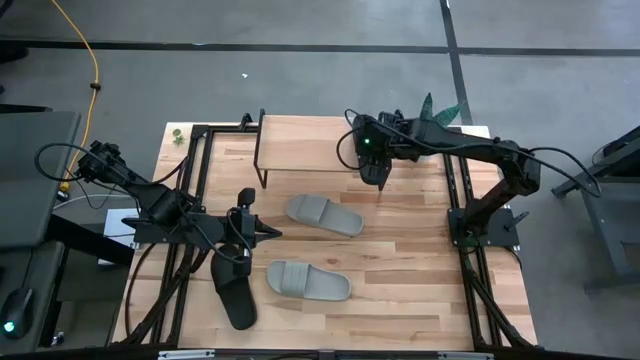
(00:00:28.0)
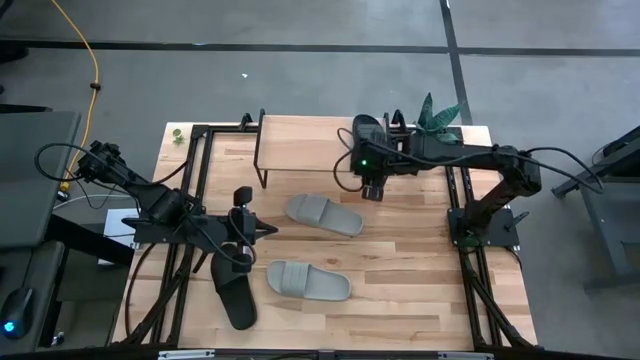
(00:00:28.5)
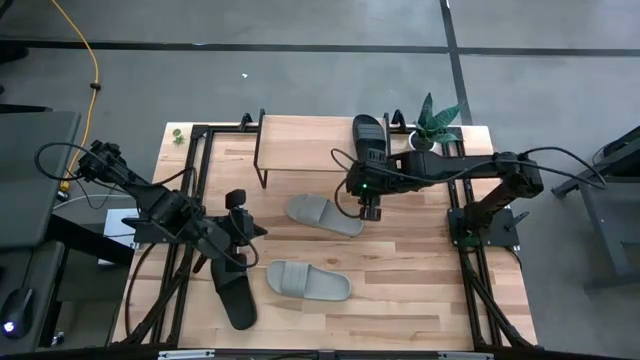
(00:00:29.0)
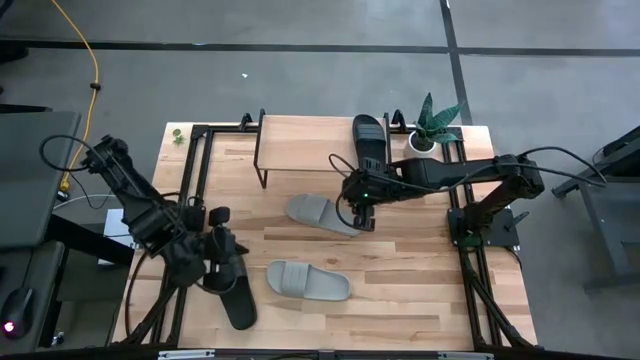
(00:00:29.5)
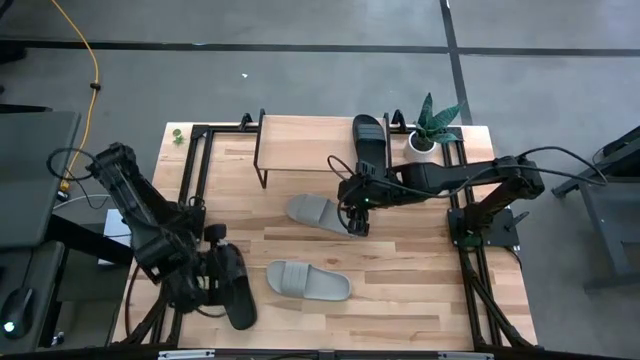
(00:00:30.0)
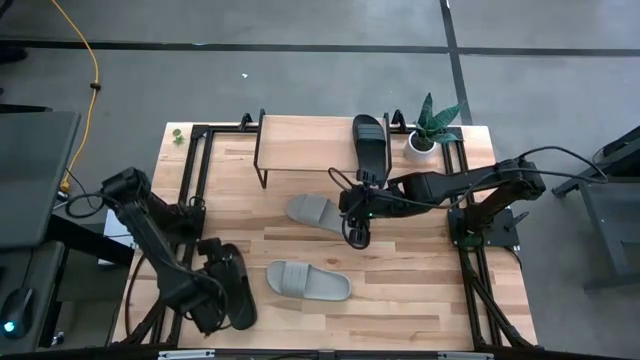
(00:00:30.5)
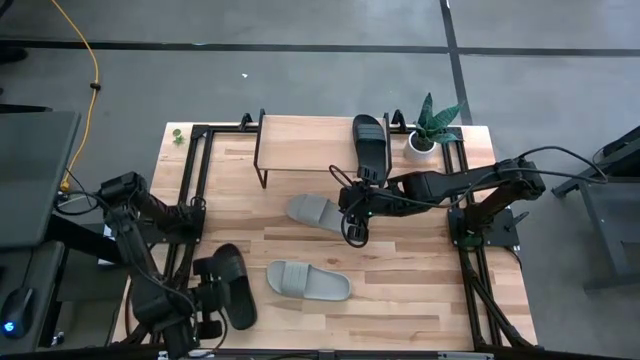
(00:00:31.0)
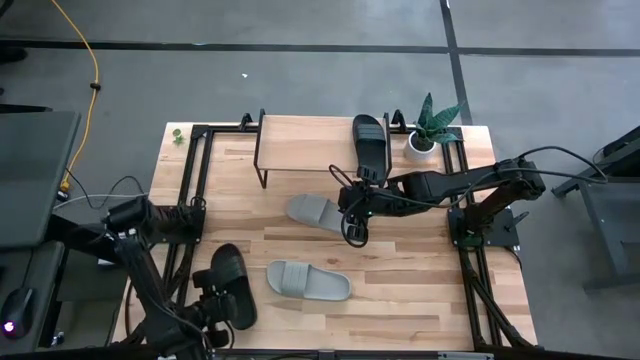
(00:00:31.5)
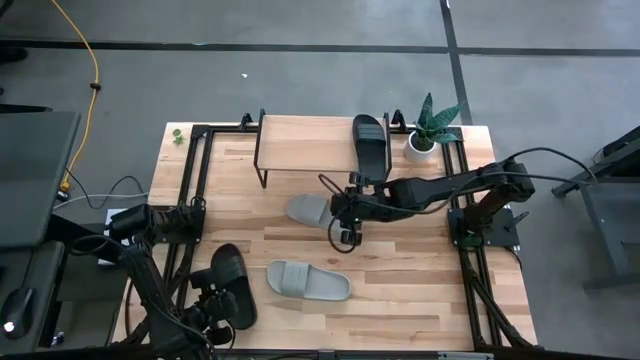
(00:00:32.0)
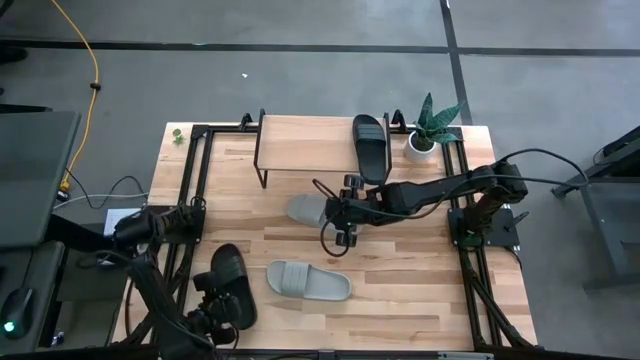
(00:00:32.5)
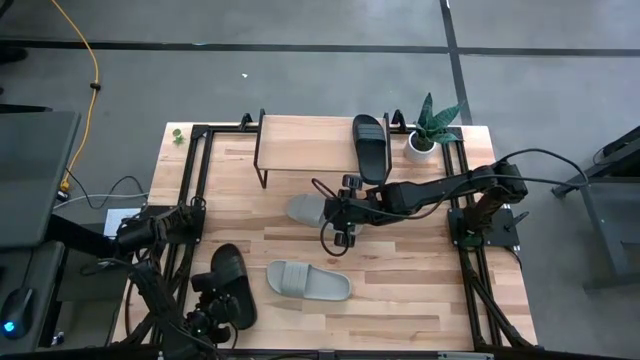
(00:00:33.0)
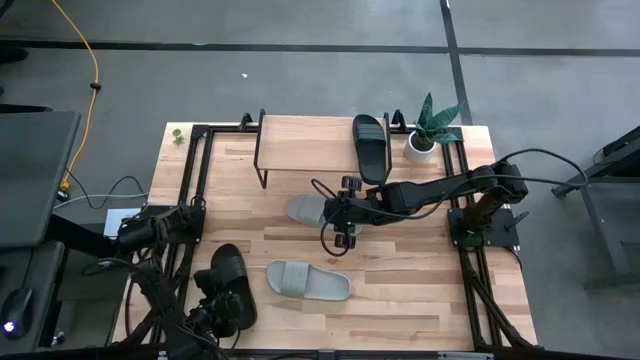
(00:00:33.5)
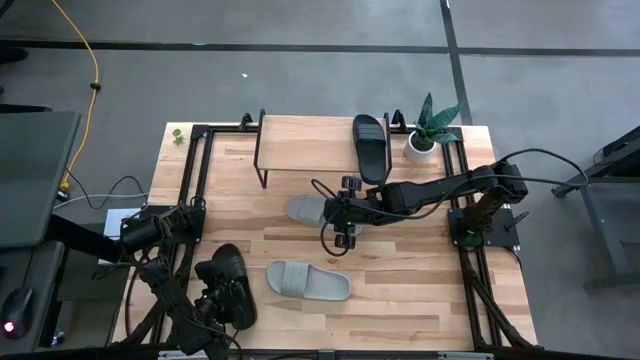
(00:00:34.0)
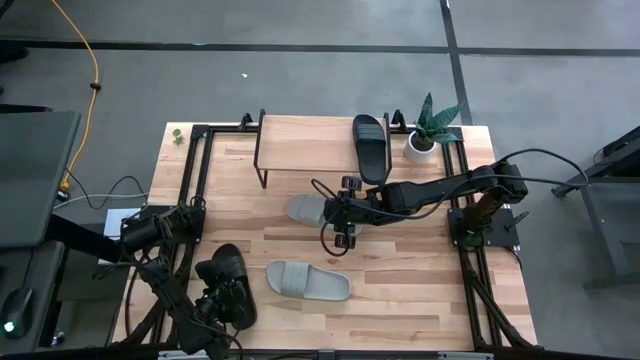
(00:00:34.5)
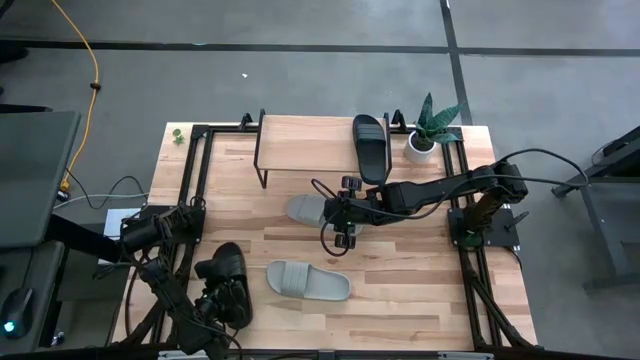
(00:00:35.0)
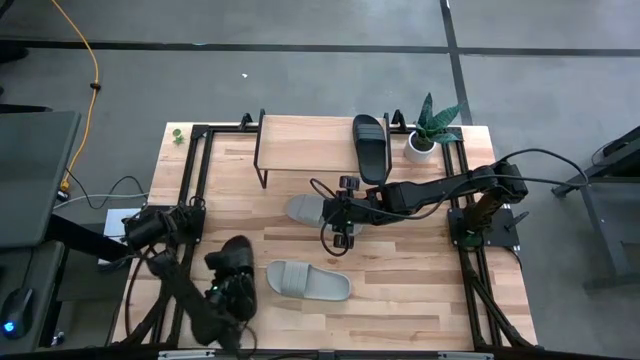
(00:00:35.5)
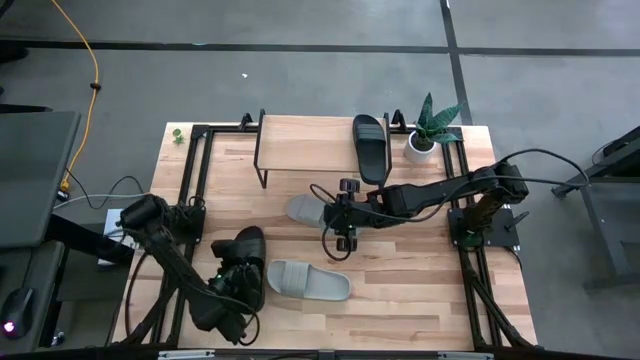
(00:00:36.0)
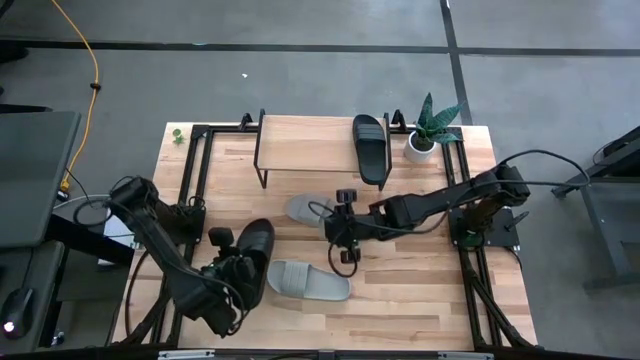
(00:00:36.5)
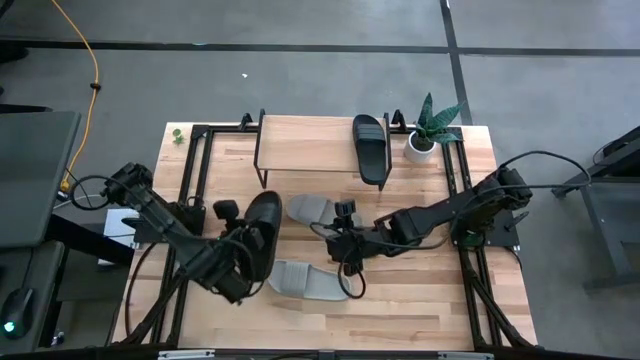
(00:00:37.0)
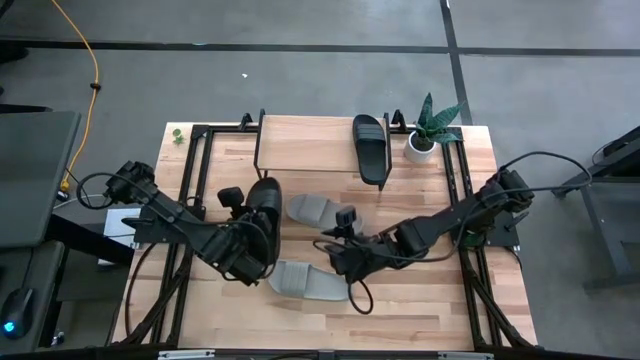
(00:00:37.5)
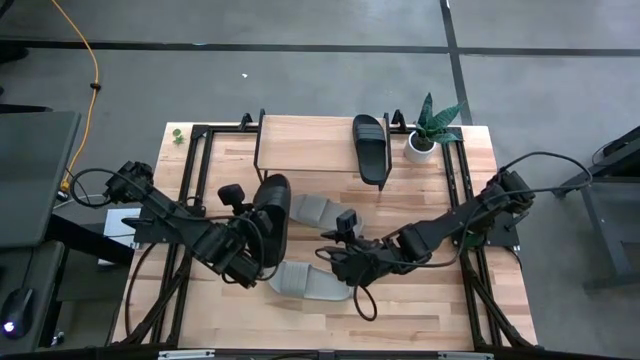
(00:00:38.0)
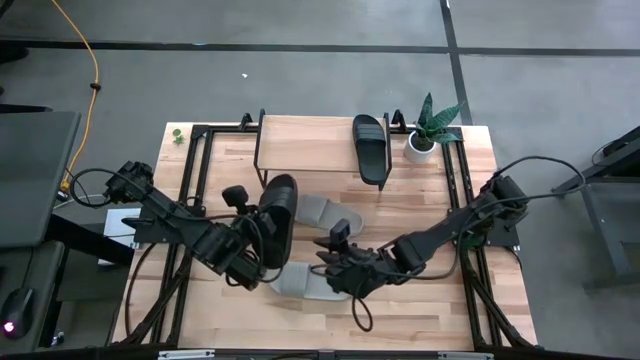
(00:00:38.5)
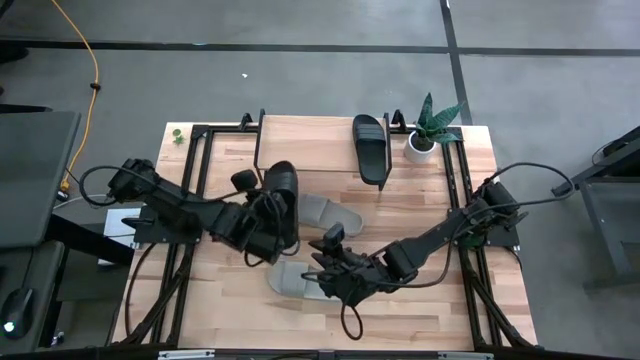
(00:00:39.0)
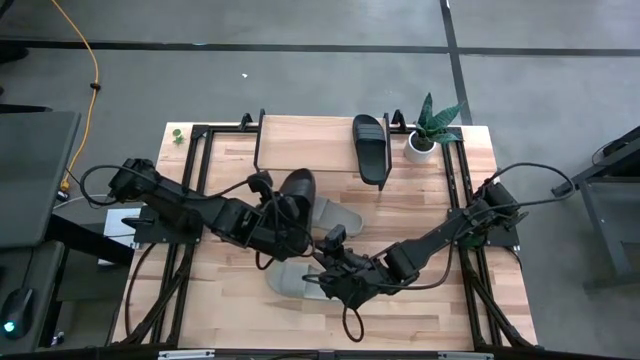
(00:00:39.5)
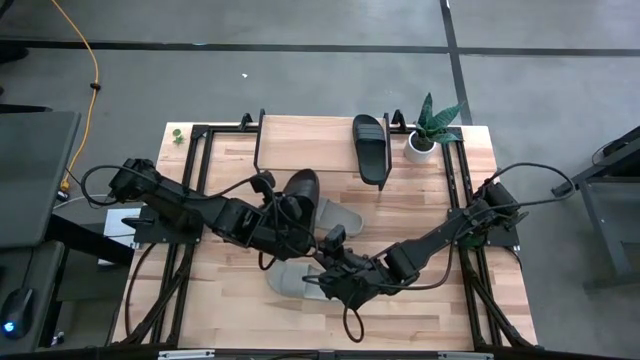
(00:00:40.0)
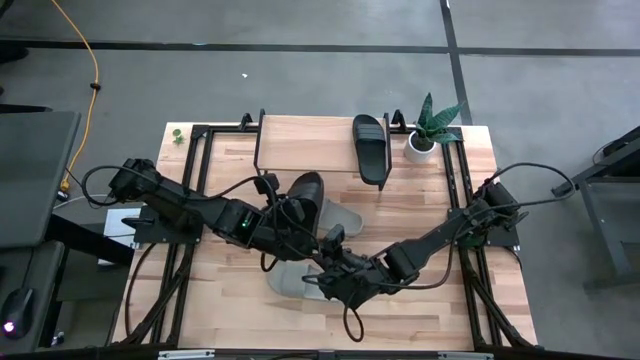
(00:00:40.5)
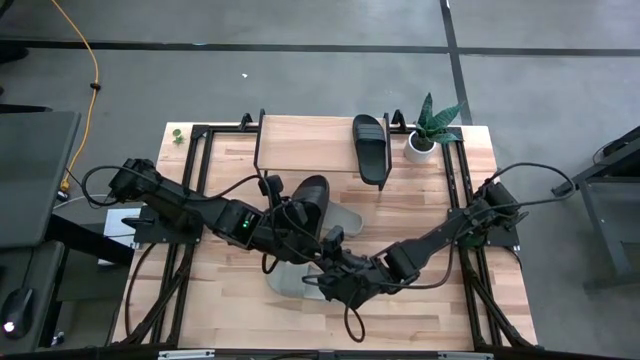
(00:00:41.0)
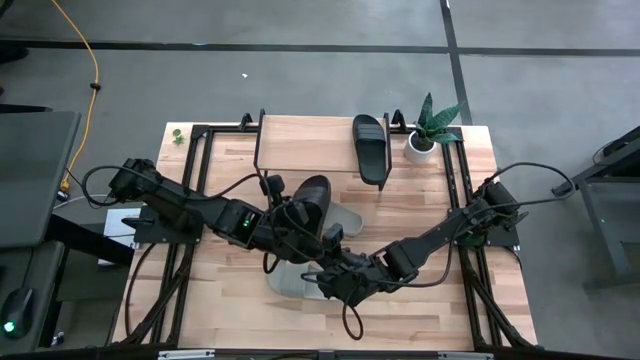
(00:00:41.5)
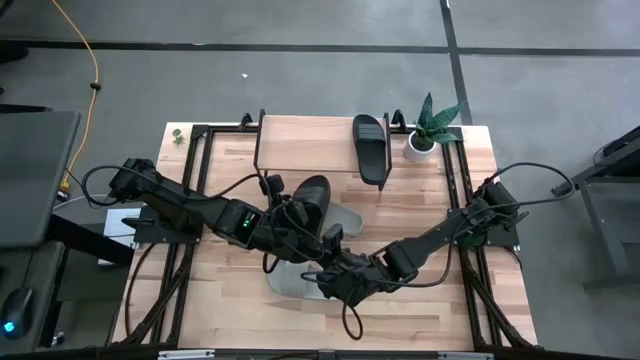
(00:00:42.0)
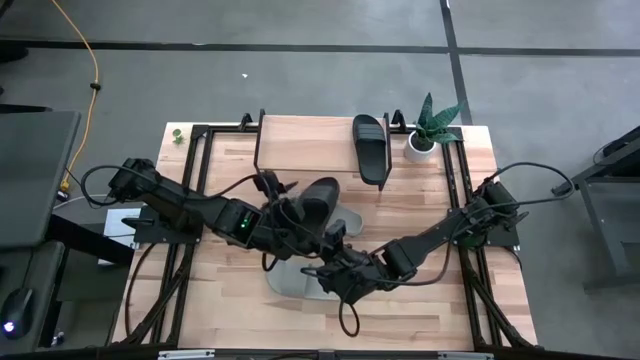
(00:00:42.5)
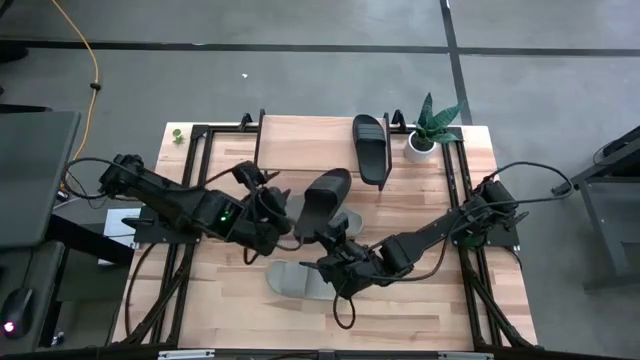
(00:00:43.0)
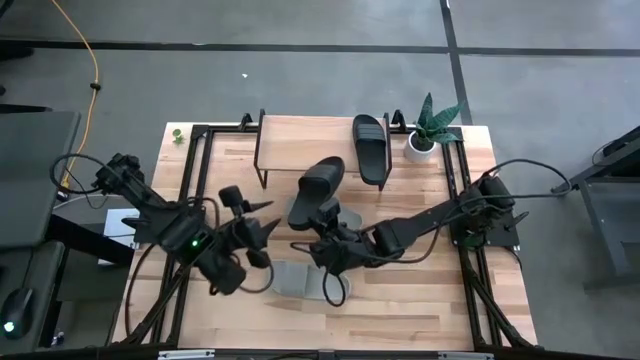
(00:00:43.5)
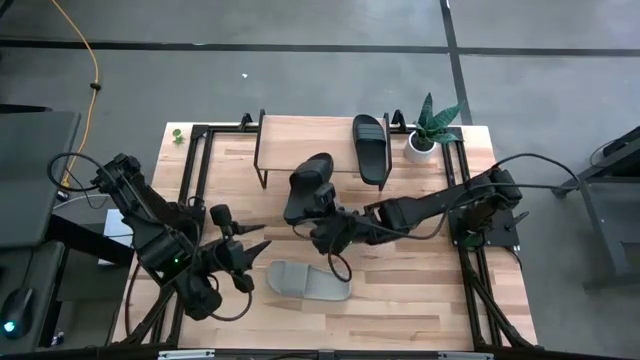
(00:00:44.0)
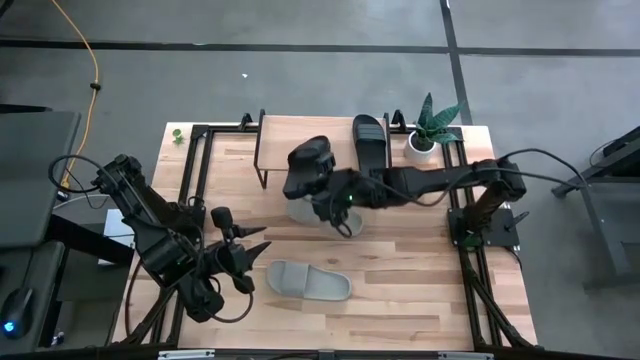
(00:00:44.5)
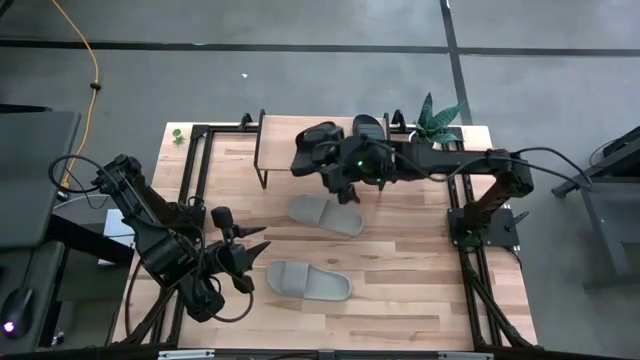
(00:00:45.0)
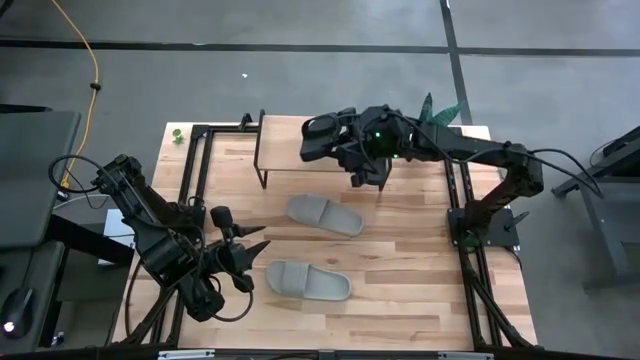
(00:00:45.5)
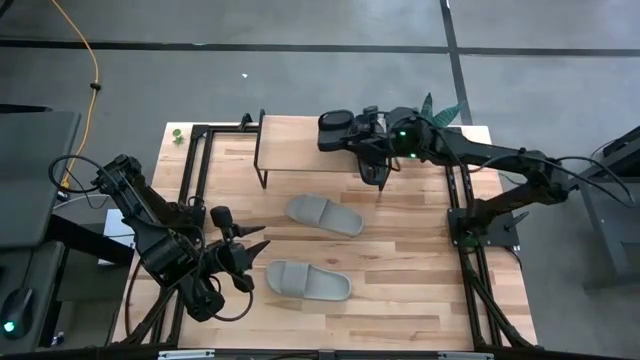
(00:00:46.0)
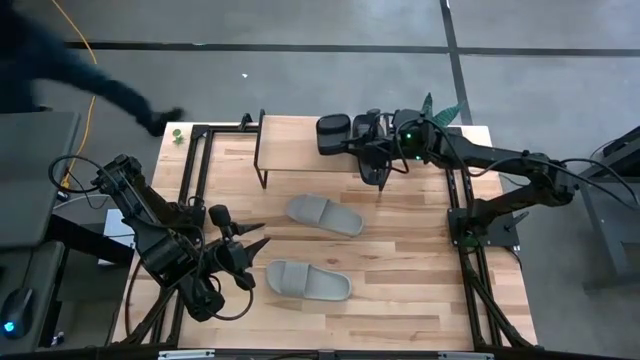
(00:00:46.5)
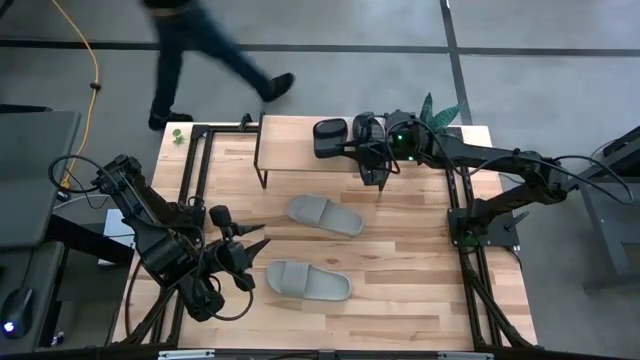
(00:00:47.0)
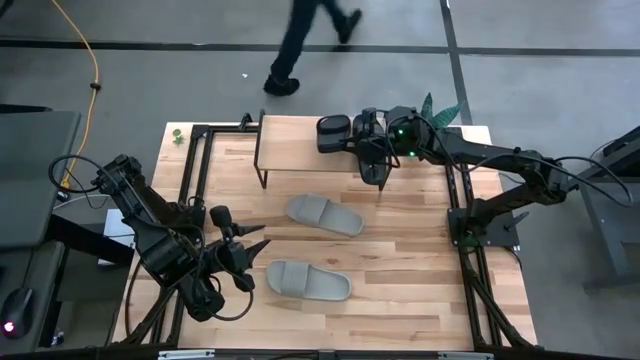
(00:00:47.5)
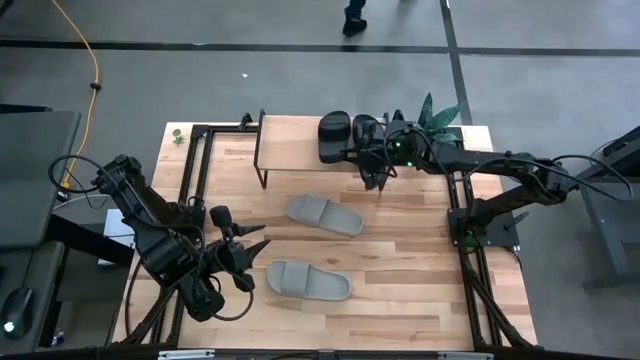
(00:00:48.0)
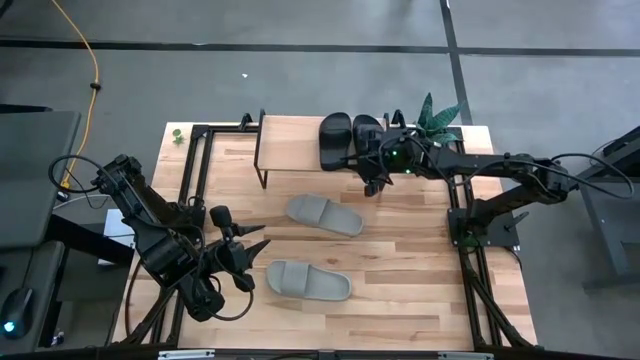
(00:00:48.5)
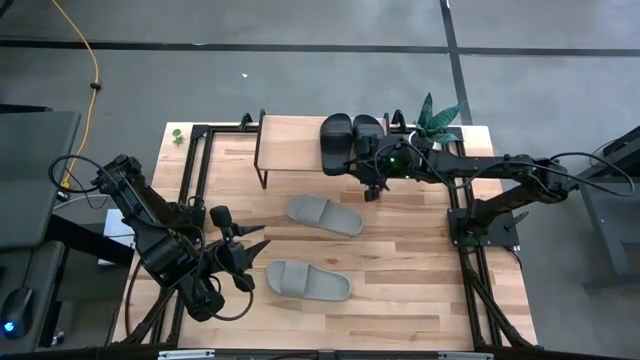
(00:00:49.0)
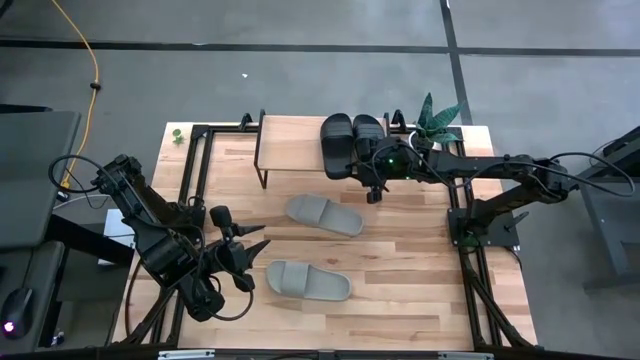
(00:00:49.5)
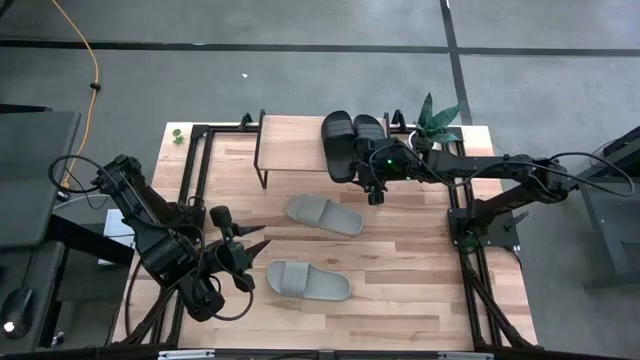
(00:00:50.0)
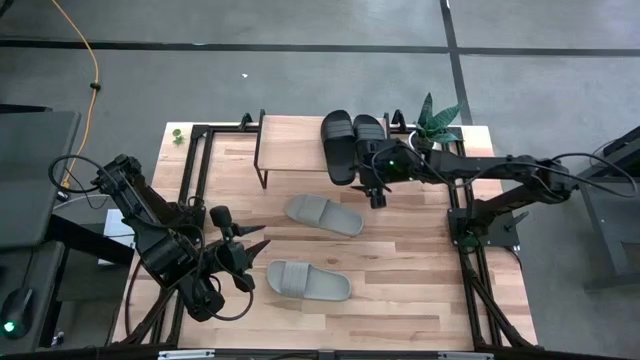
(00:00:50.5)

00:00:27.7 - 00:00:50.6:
Task: Pick and place slides into the shelf
Put the black slide on the shelf
